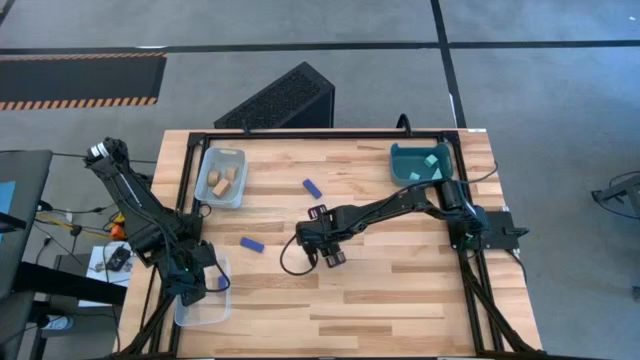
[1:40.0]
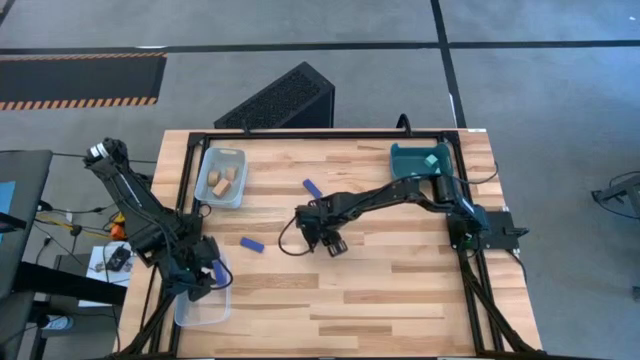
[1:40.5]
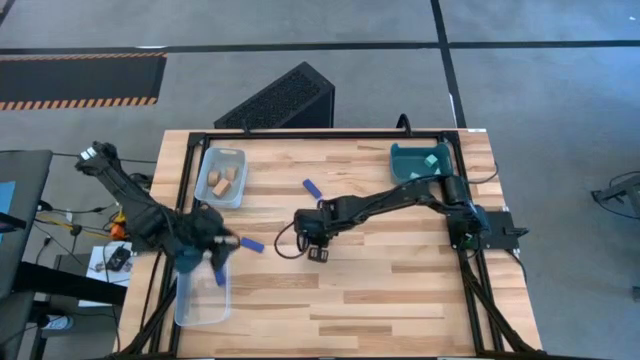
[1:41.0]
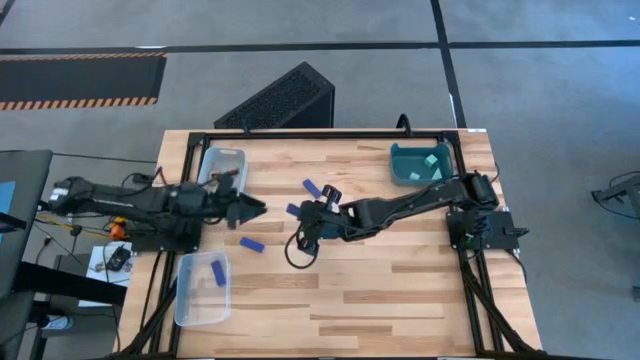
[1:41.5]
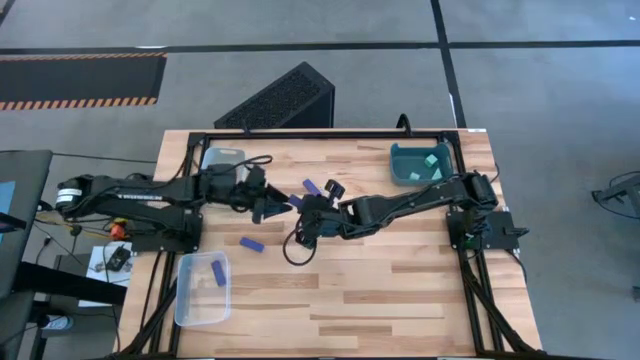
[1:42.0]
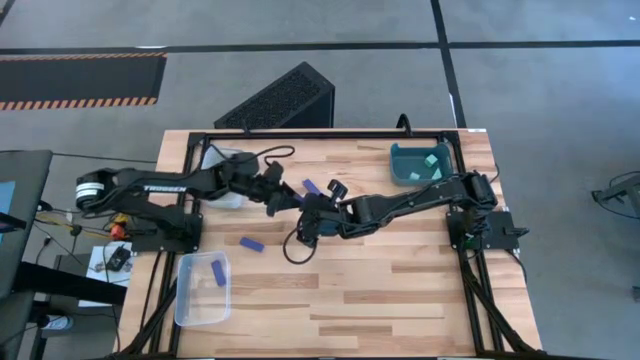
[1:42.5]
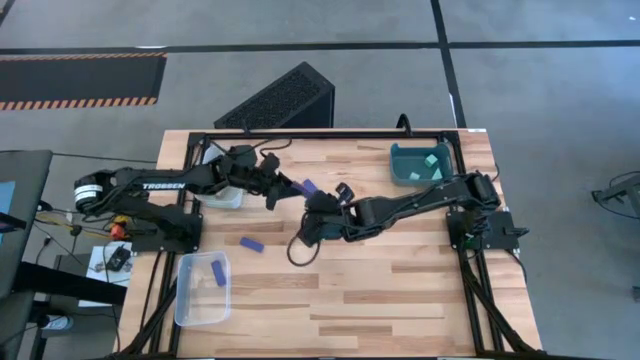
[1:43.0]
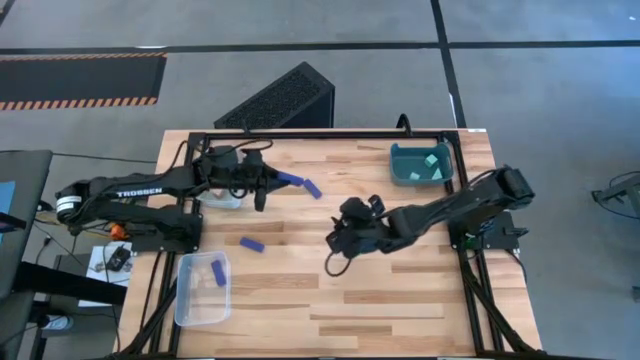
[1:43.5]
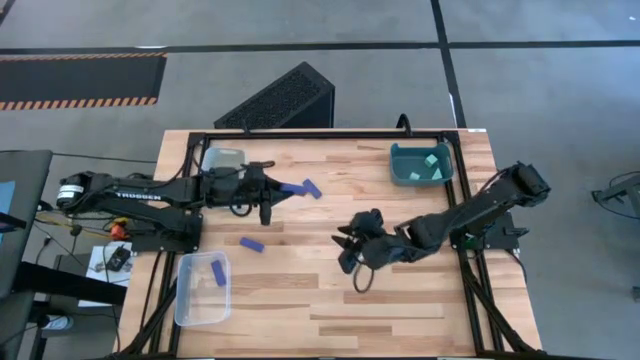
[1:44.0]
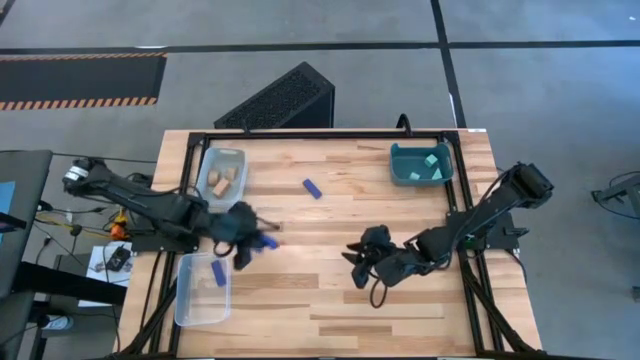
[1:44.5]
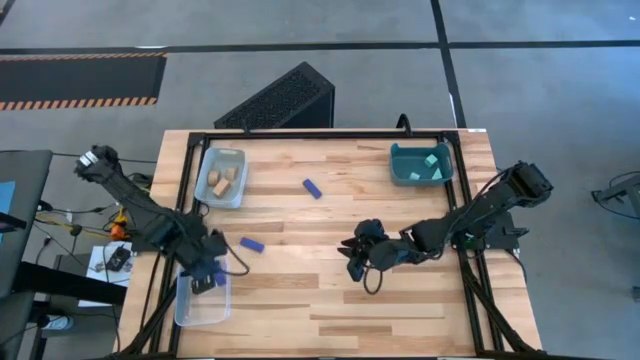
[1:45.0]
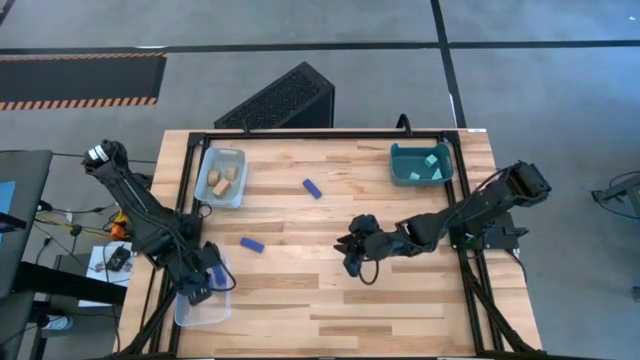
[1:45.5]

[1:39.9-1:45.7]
Task: Sort & place blocks by color
Put the blue block into the transparent bin

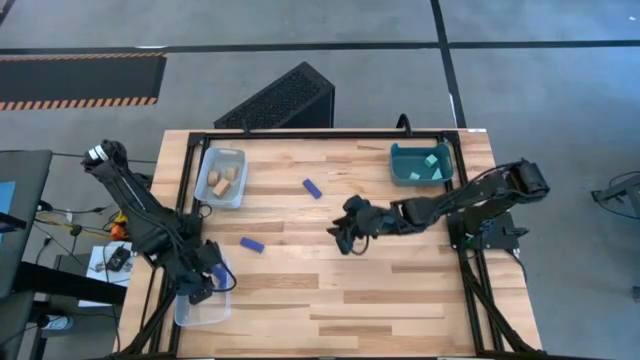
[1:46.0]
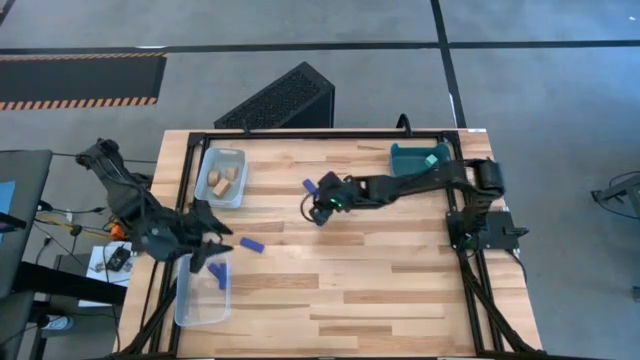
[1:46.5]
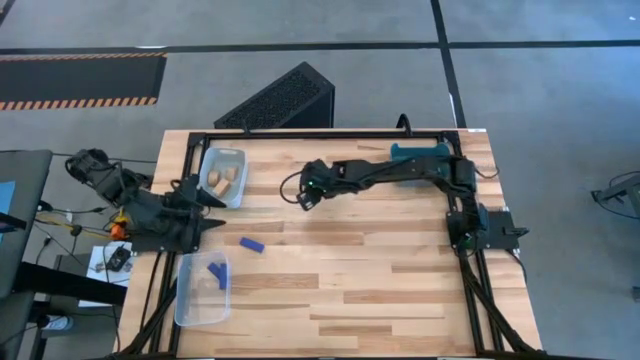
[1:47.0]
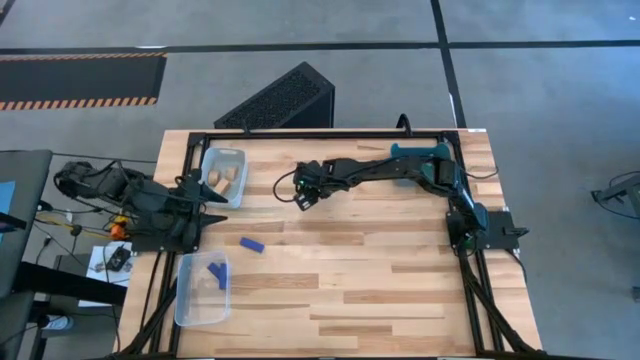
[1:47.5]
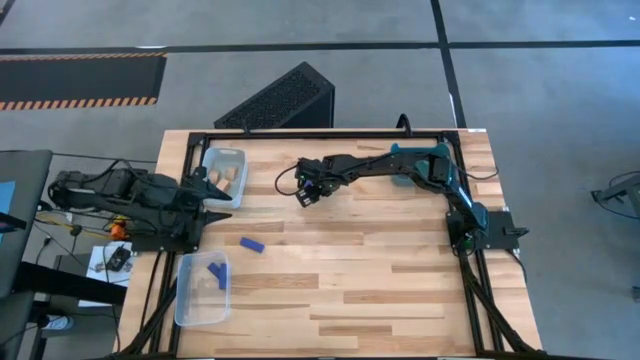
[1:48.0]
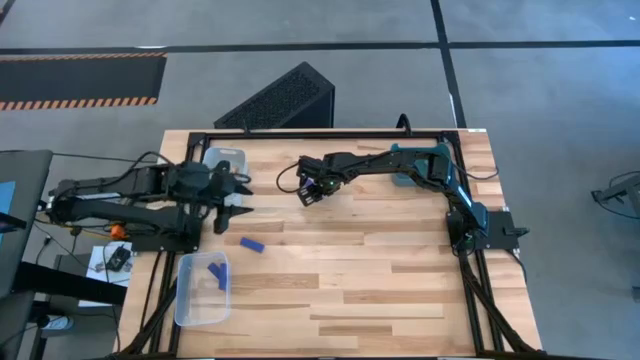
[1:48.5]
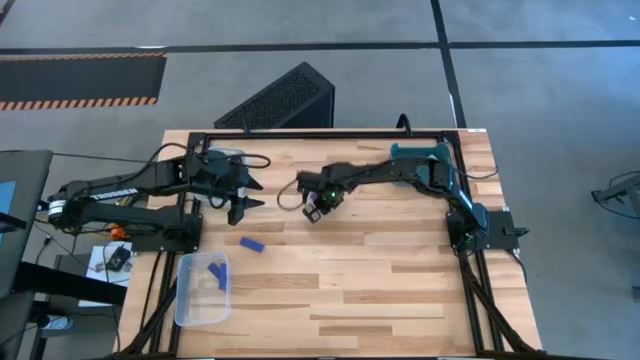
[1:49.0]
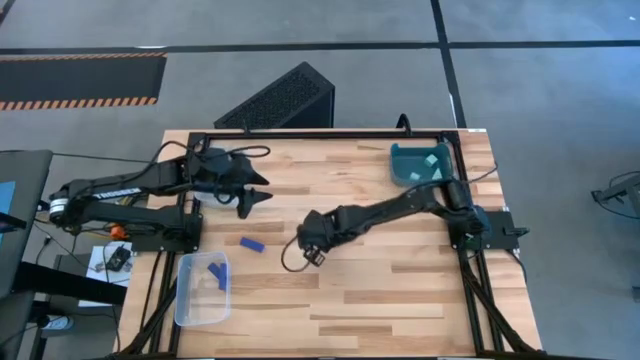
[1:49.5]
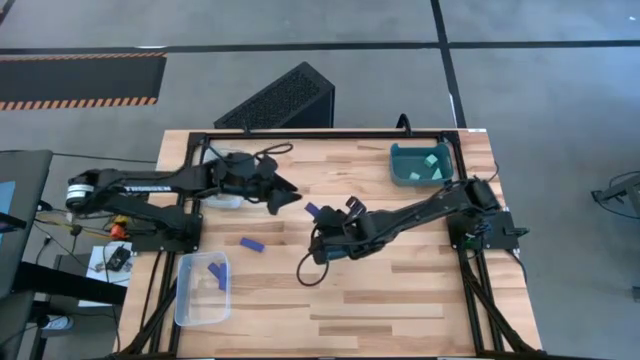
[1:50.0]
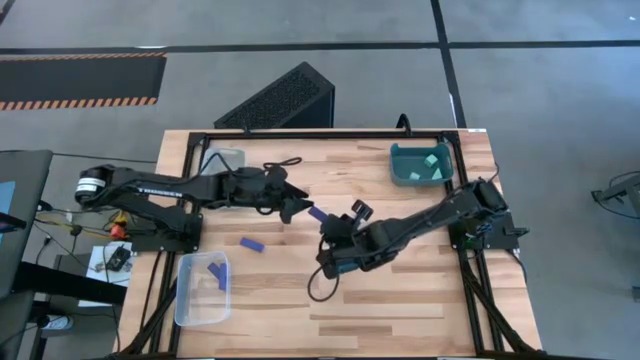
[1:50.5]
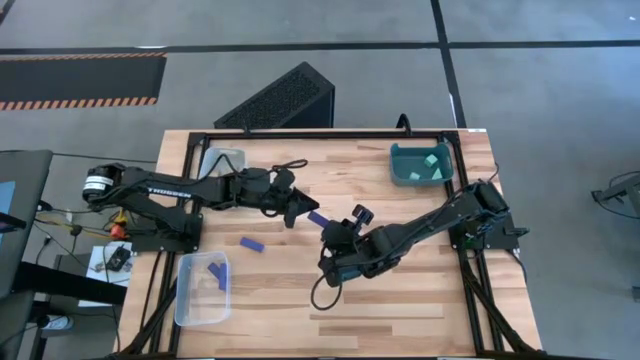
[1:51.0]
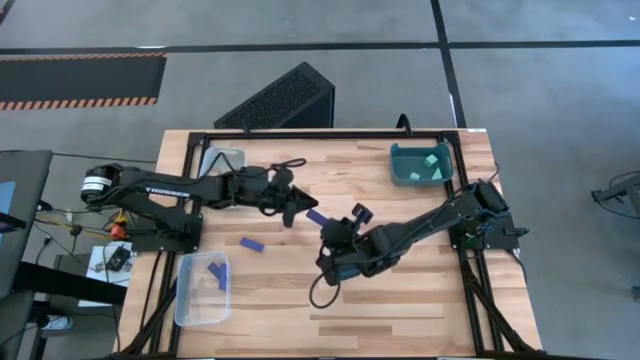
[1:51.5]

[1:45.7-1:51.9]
Put the blue block into the transparent bin

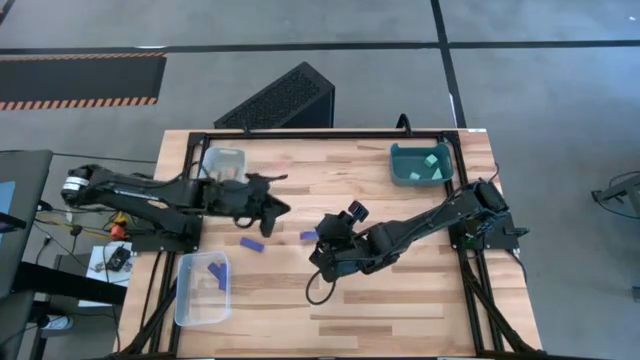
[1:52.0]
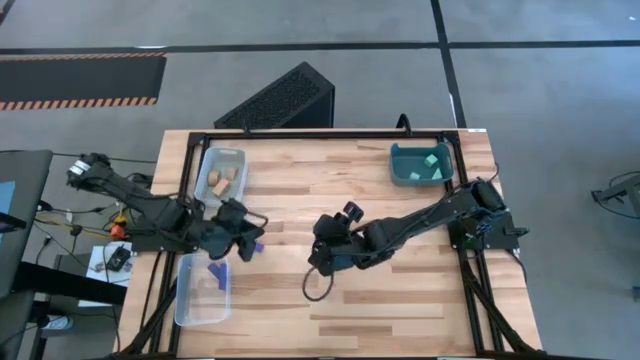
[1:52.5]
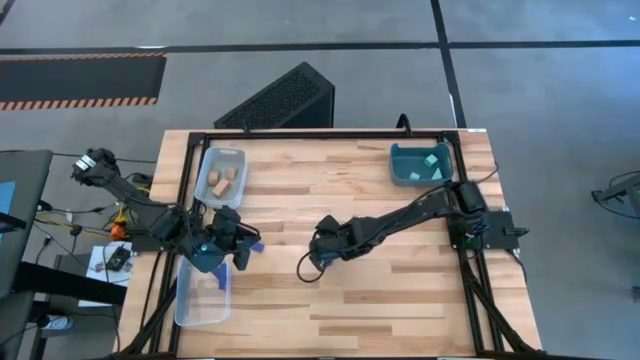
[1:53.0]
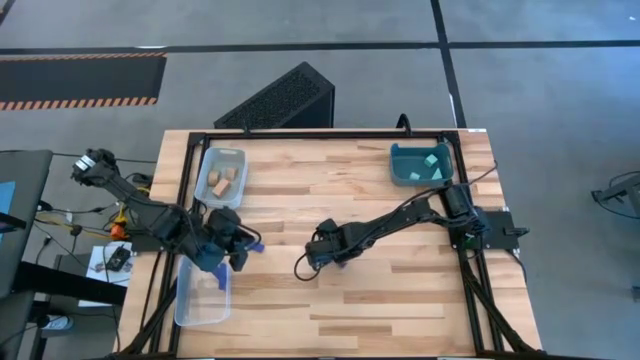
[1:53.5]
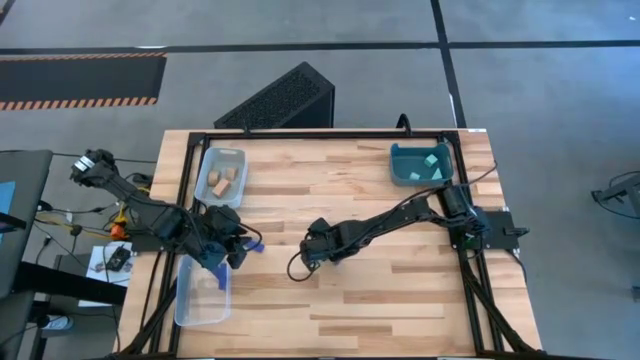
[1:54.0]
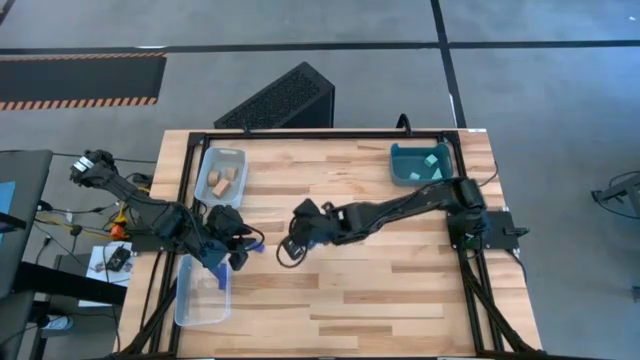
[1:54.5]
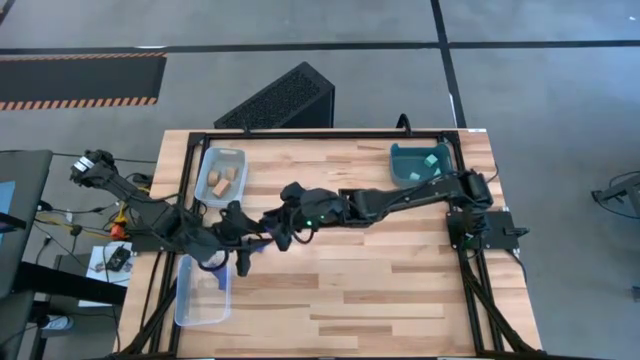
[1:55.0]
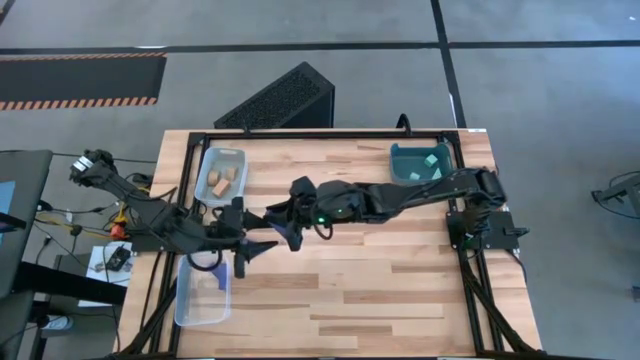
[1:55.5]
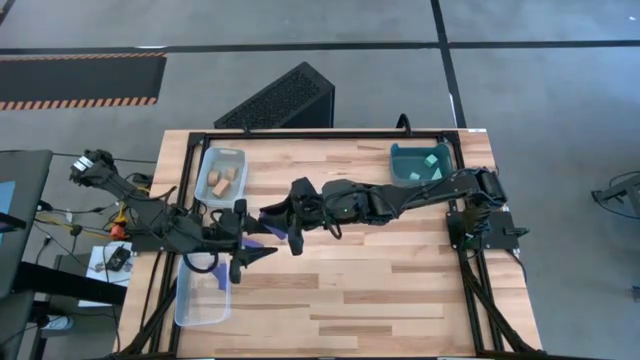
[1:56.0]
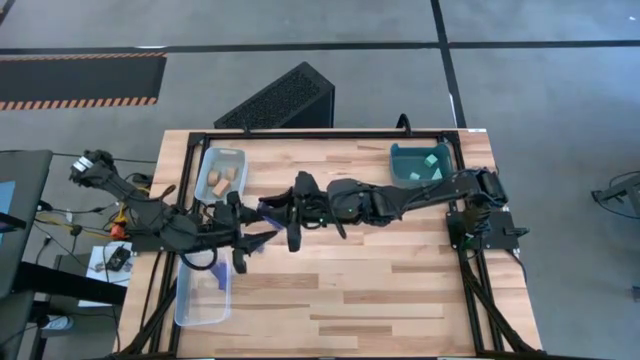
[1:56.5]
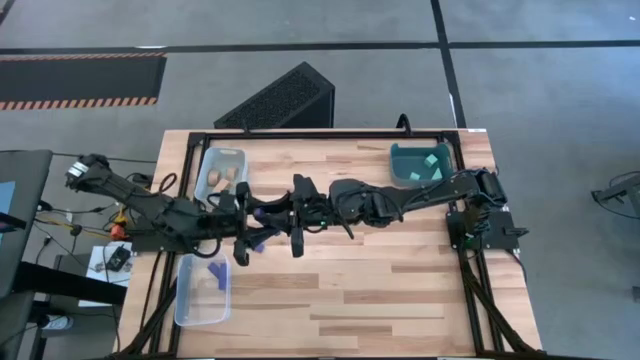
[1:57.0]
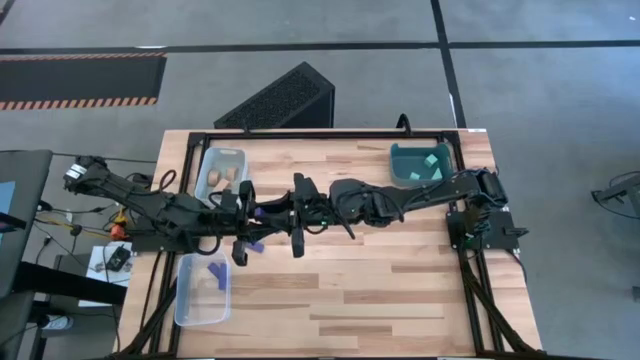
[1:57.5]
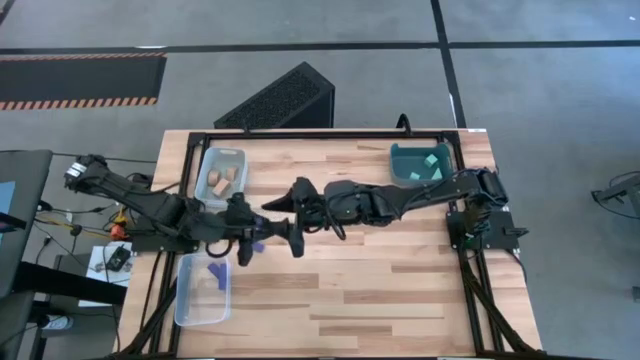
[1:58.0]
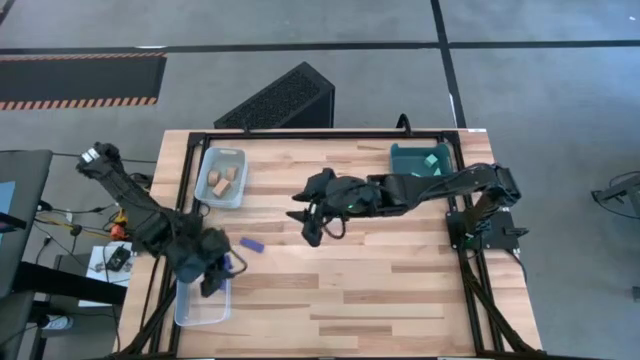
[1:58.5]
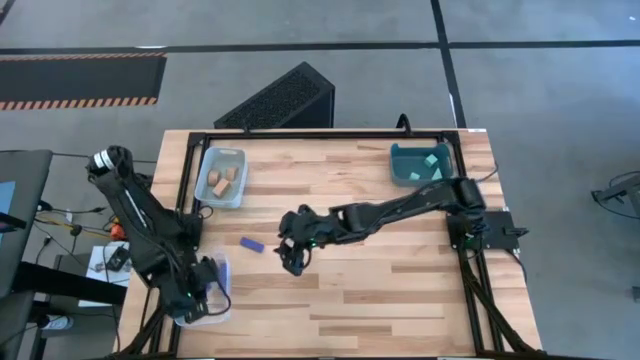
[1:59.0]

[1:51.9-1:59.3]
Put the blue block into the transparent bin

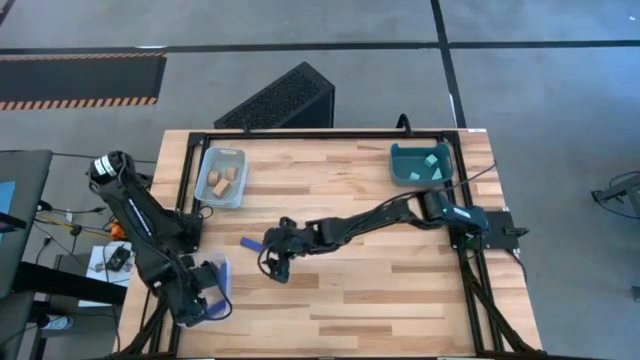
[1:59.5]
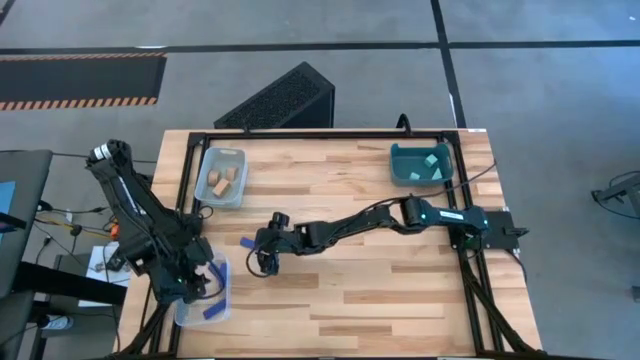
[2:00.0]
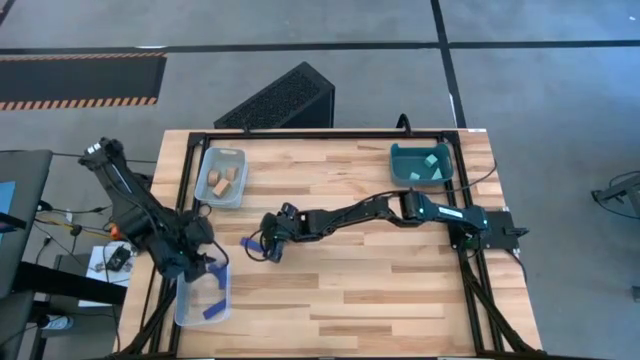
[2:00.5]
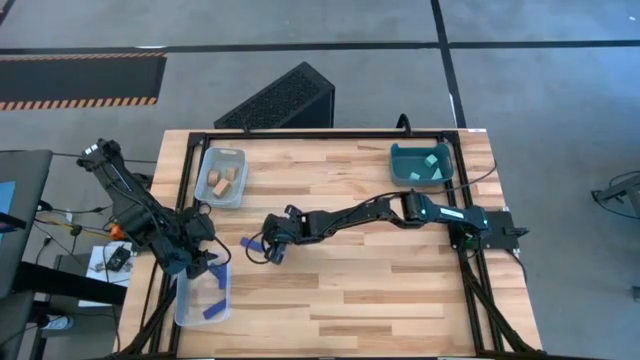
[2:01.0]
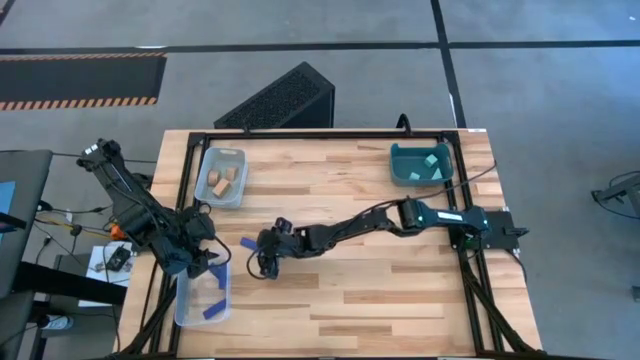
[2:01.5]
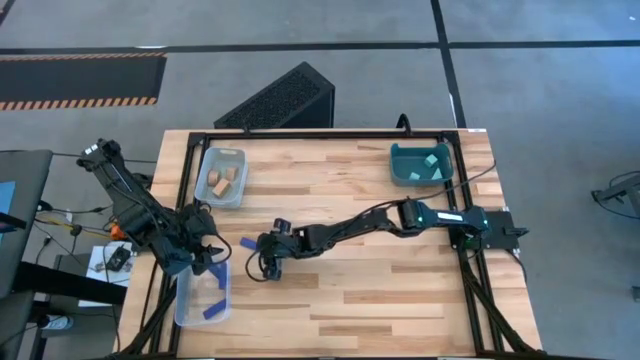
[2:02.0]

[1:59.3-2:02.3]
Put the blue block into the transparent bin
